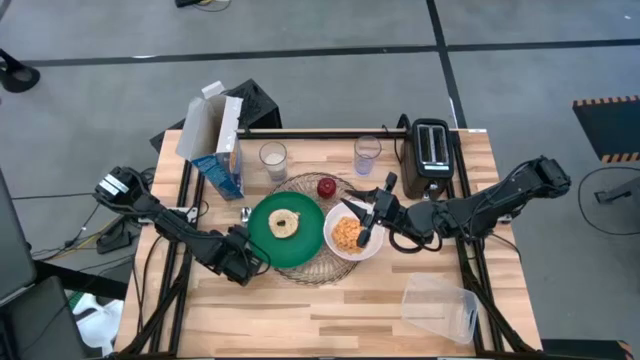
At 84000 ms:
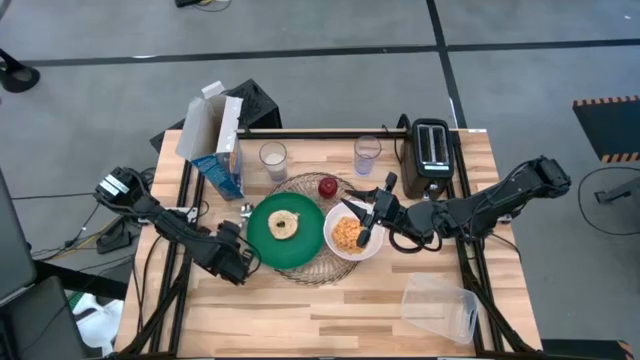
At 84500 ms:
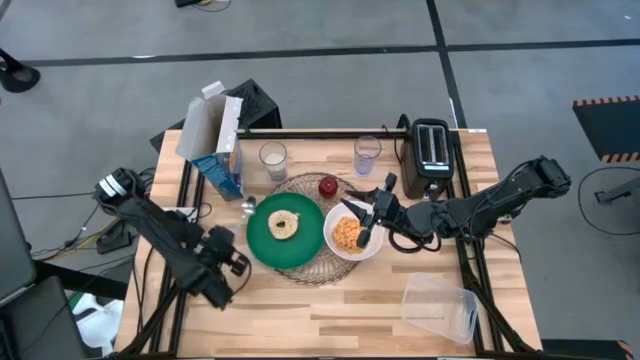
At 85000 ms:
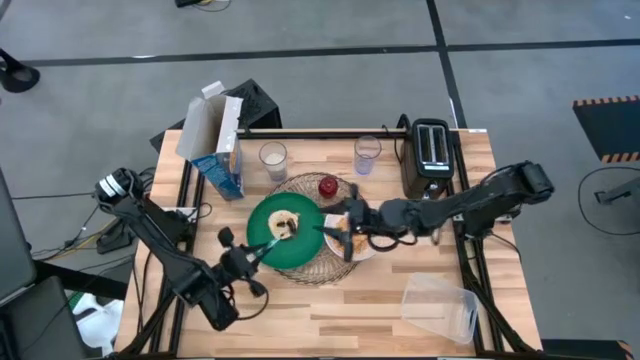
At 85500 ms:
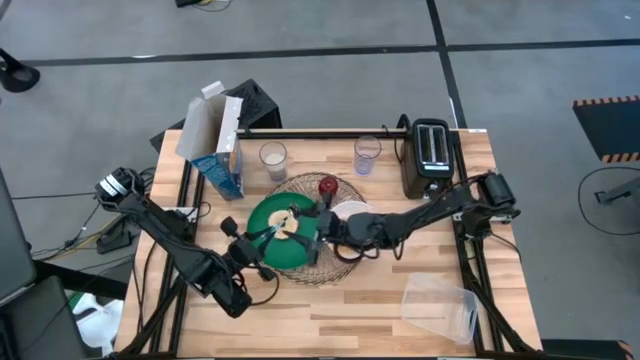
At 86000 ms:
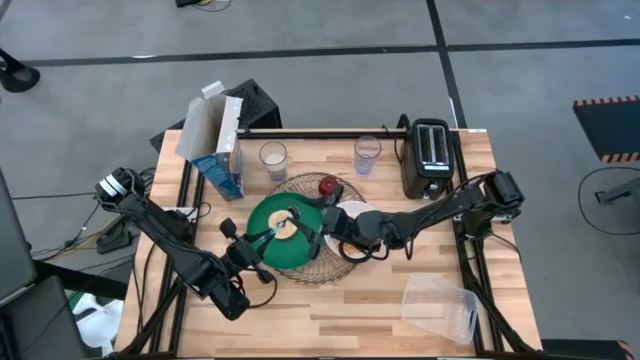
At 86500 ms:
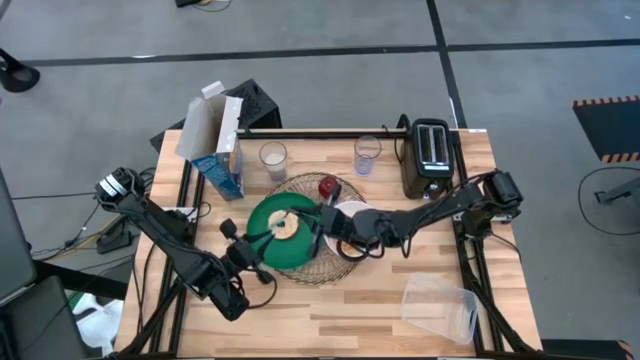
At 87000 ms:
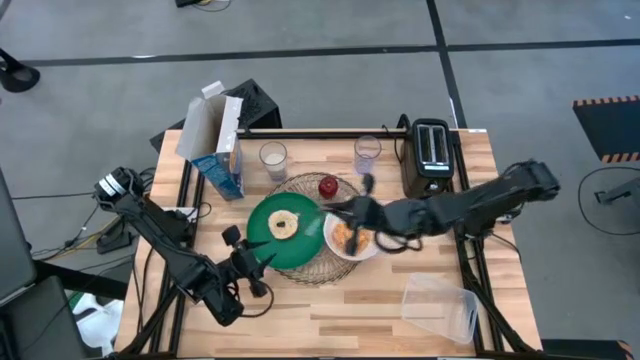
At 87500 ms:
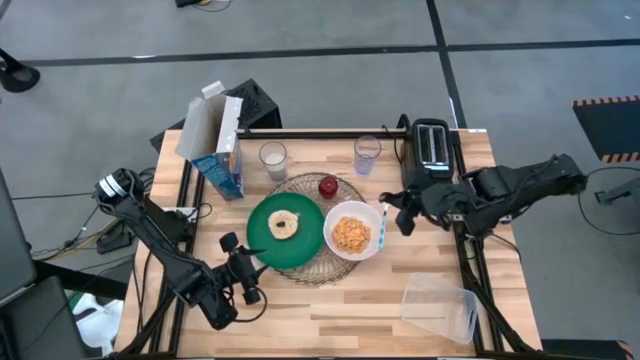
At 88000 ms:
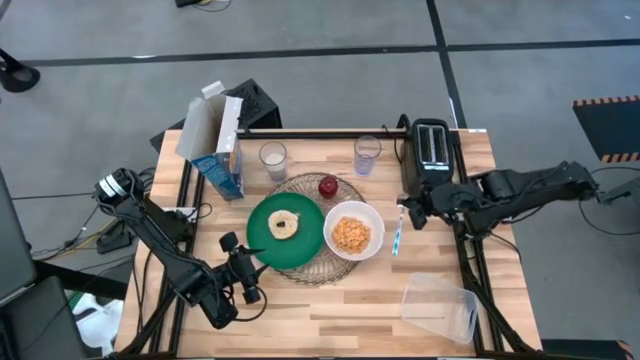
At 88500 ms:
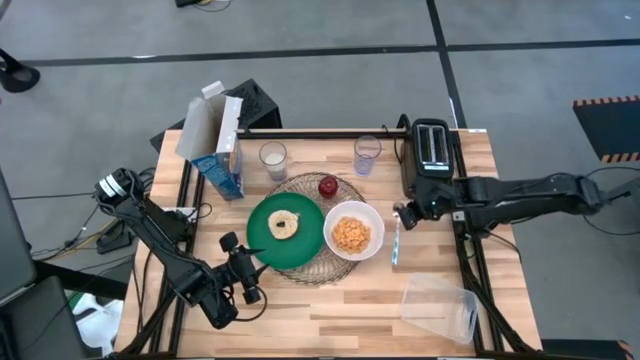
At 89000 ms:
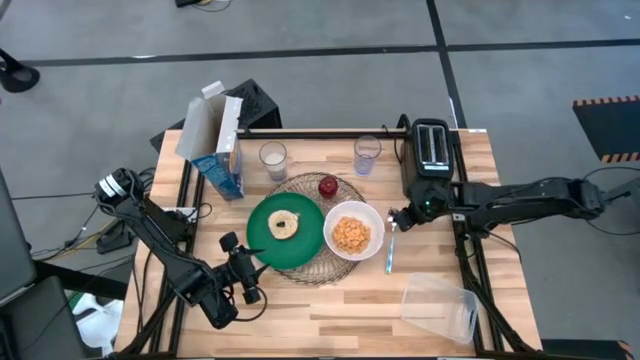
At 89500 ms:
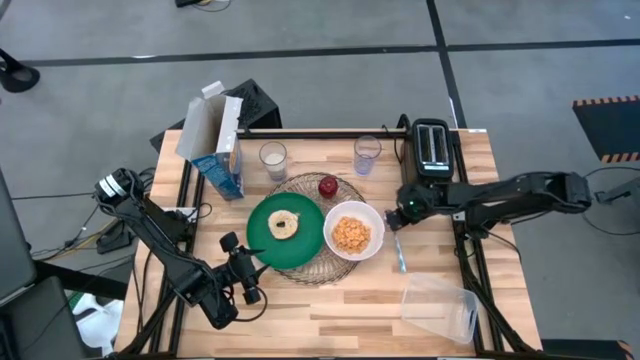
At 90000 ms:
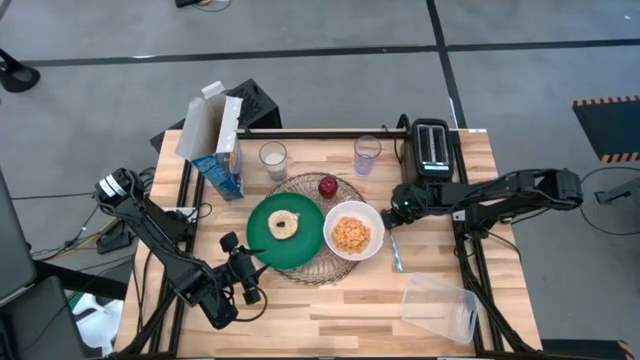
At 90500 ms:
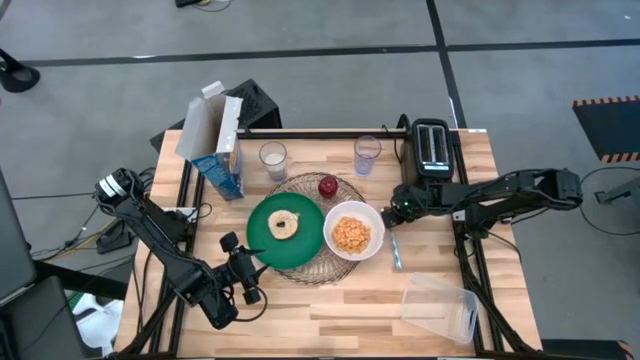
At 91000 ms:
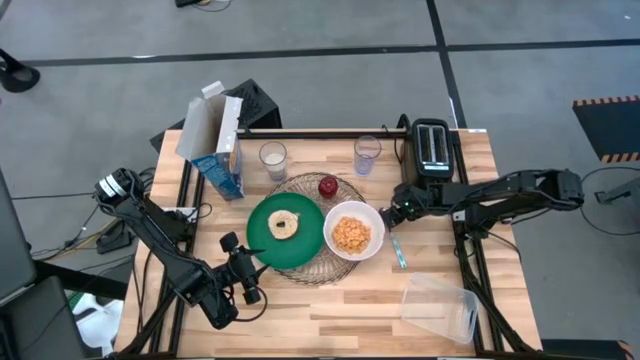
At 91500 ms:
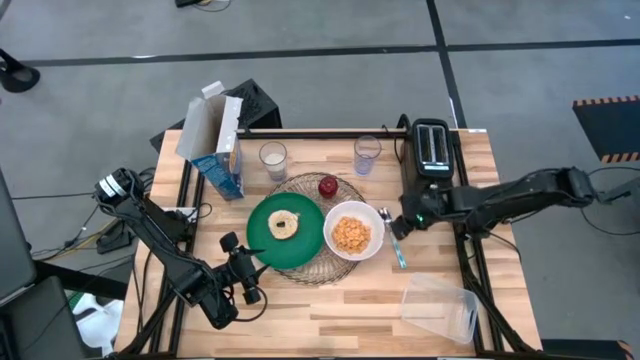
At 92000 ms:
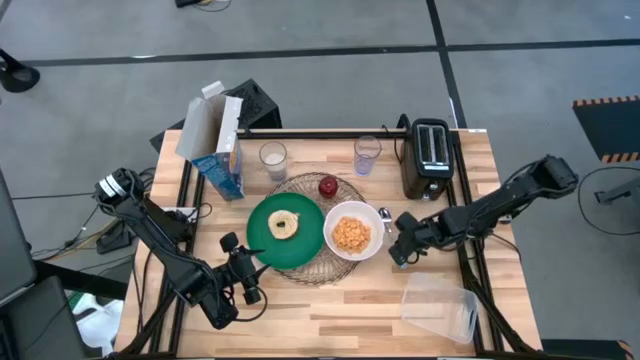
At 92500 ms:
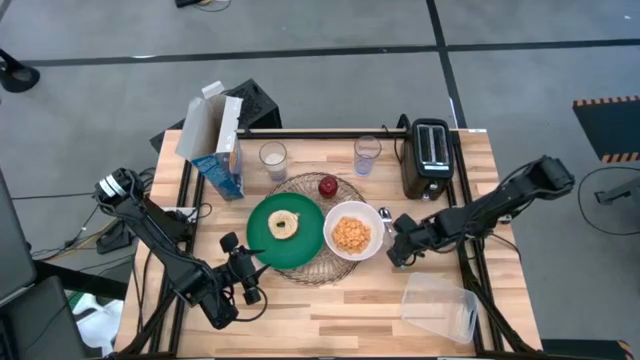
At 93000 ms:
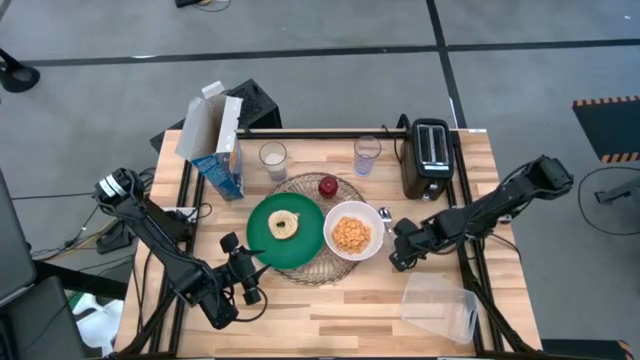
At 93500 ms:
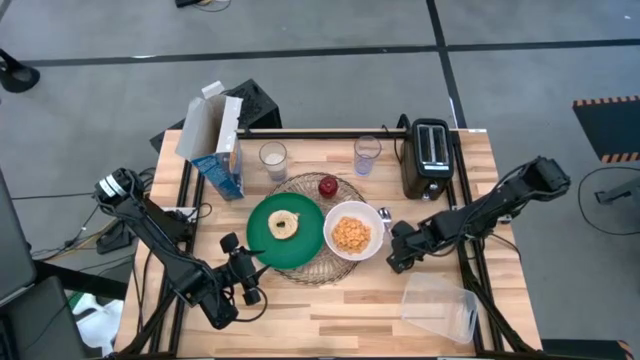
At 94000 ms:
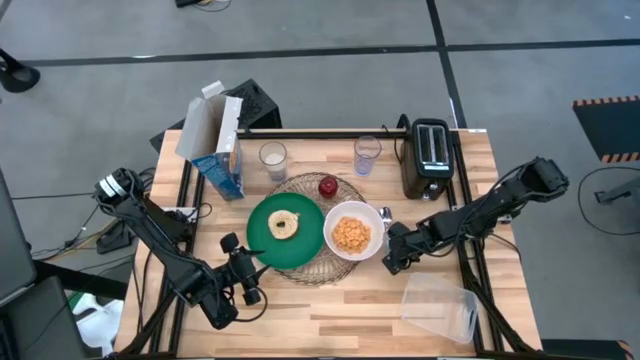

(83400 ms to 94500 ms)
Task: Arrange a breakfast setting
Put the blue patterned spoon to the right of the white bowl

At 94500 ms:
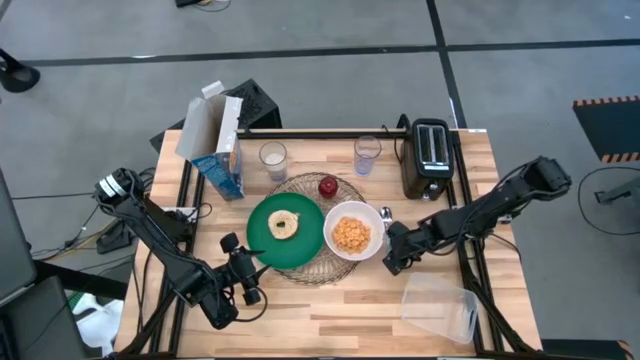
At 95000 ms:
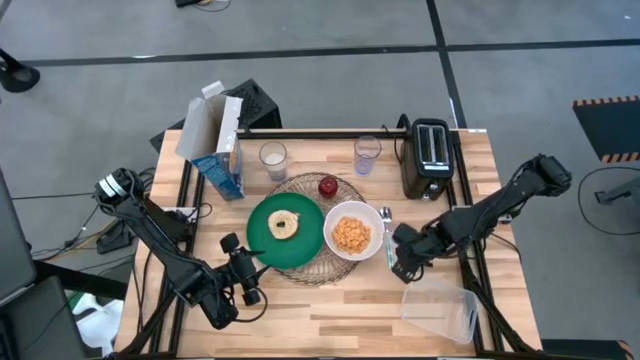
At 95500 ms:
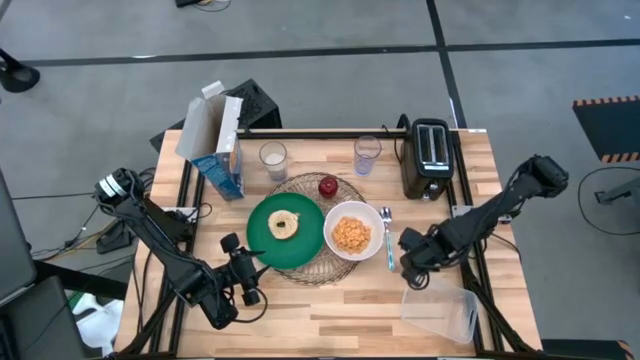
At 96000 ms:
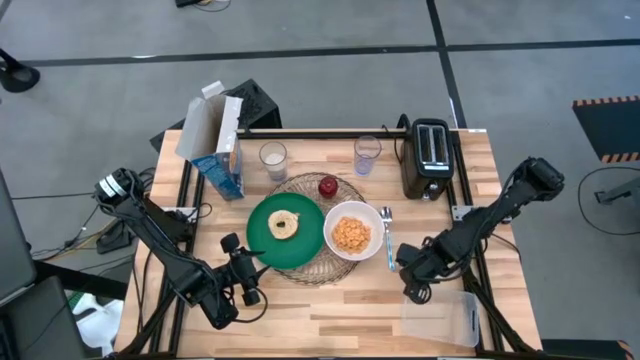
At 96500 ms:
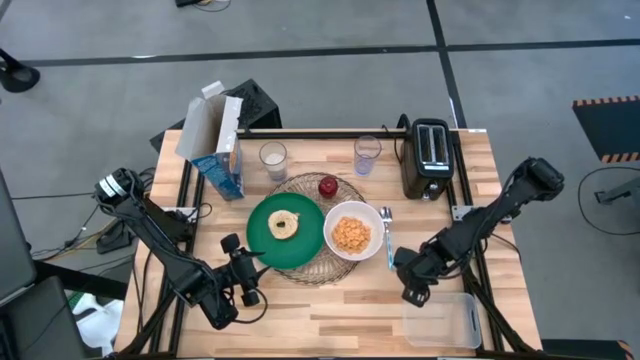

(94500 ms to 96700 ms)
Adjust the transparent bin on the table

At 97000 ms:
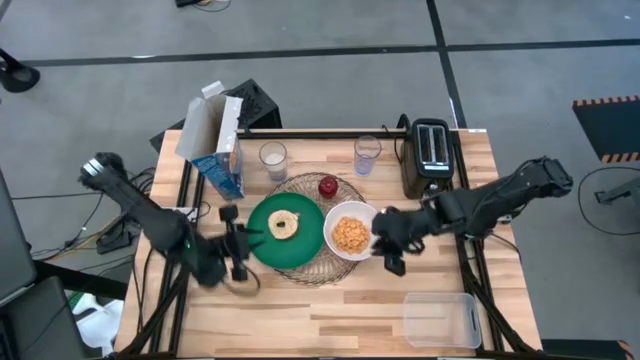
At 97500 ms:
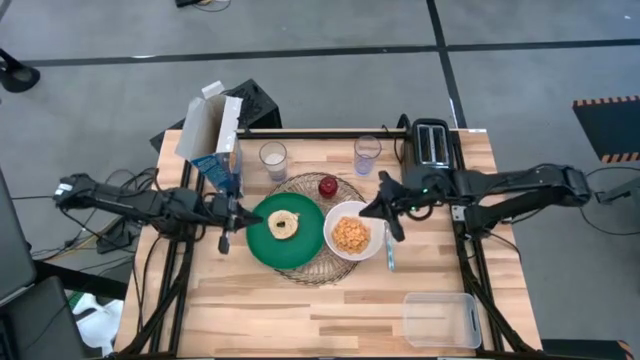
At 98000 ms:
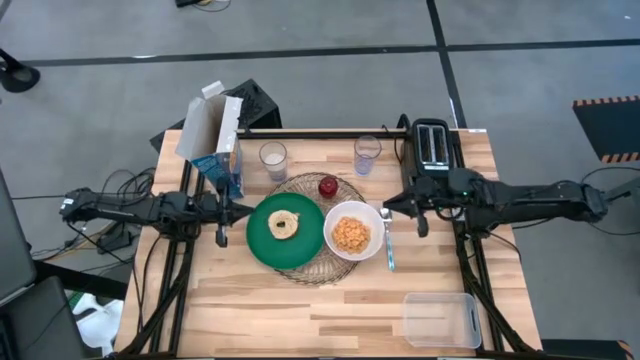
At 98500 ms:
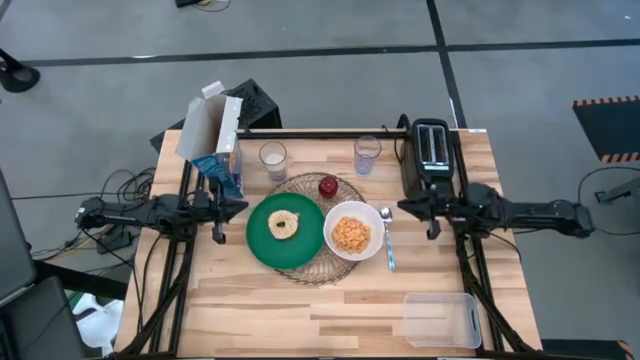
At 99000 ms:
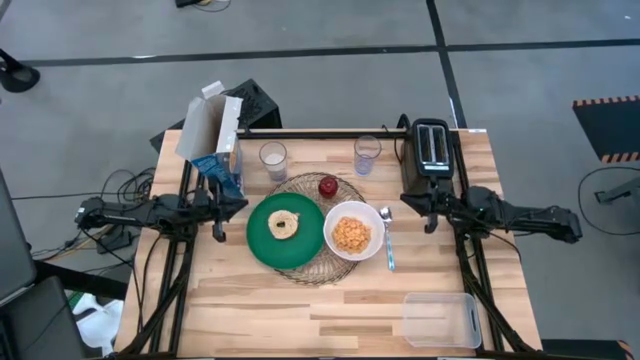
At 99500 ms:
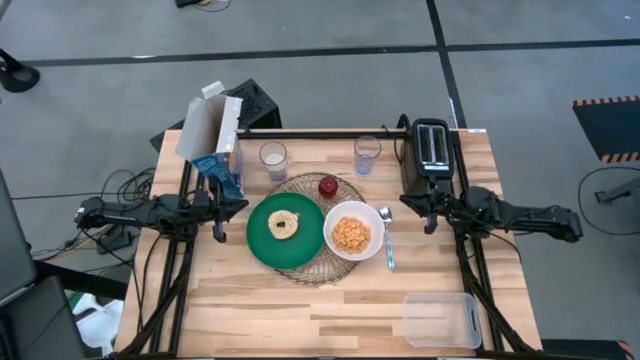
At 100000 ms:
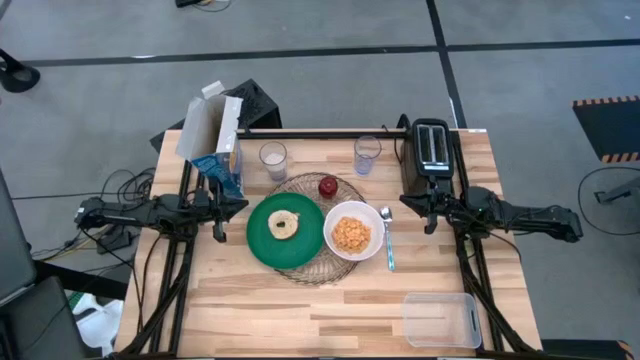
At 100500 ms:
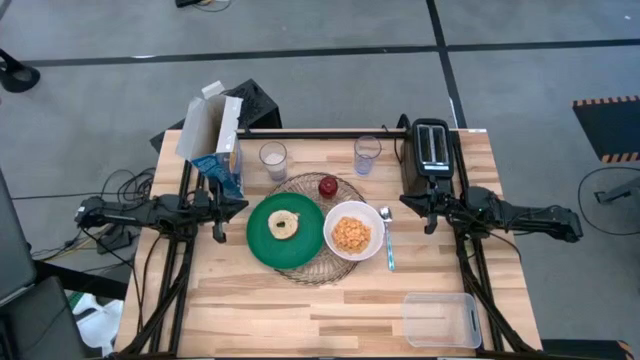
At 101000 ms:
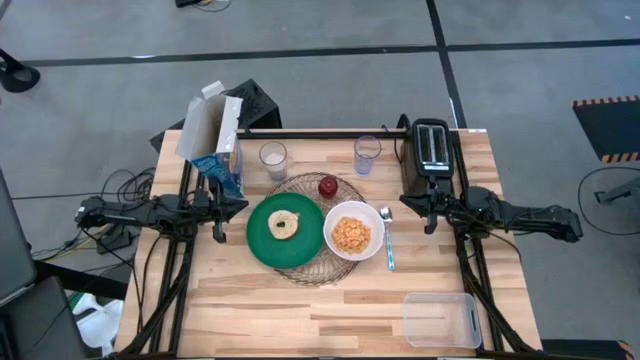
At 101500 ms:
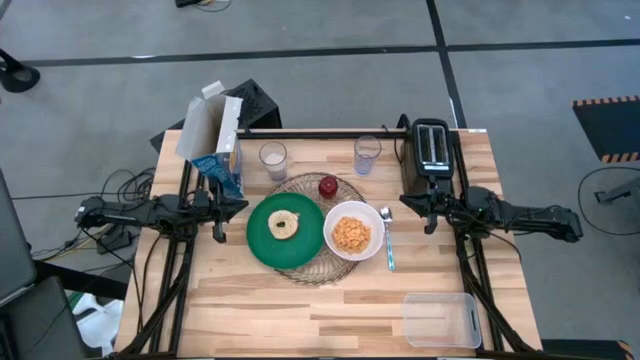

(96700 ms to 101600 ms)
Return to Home Position

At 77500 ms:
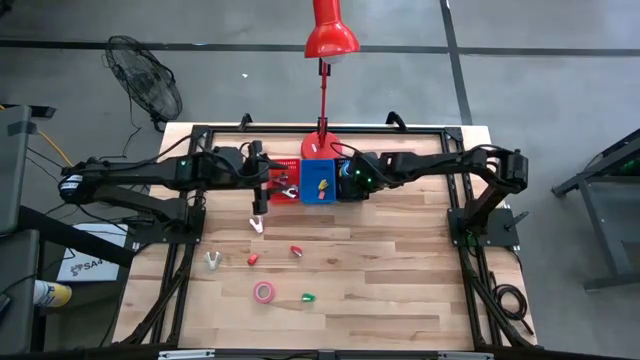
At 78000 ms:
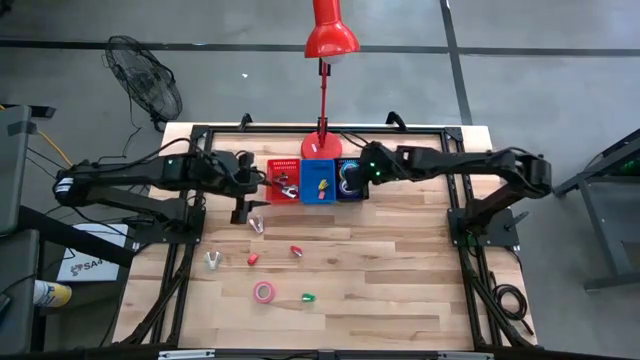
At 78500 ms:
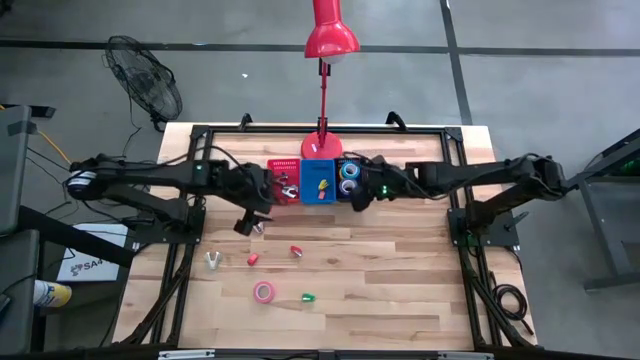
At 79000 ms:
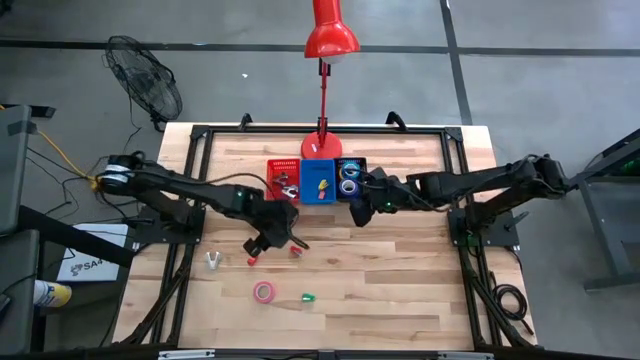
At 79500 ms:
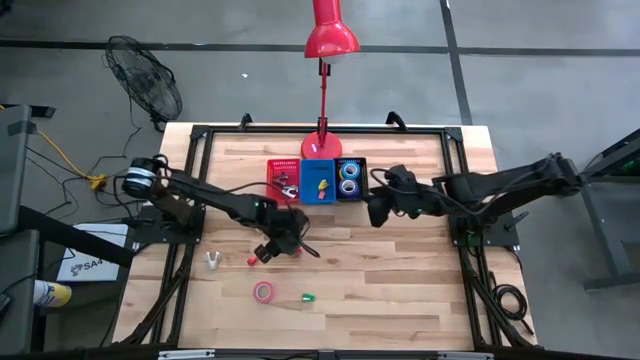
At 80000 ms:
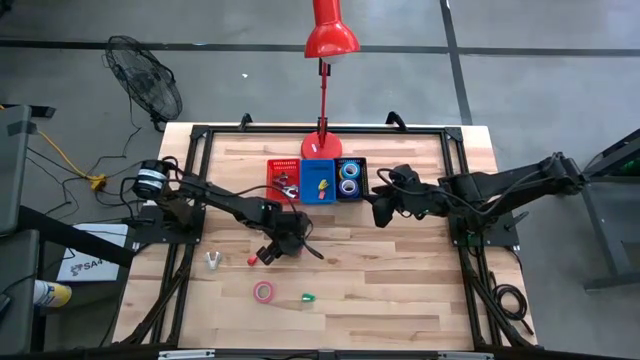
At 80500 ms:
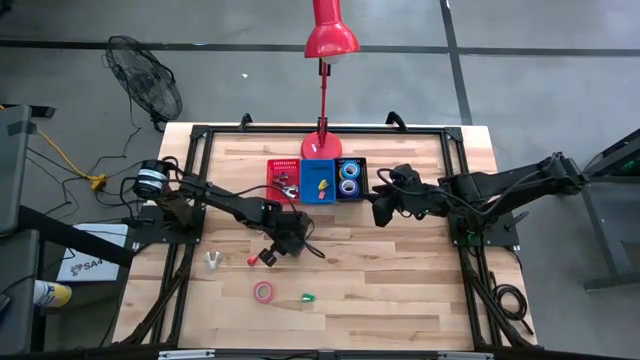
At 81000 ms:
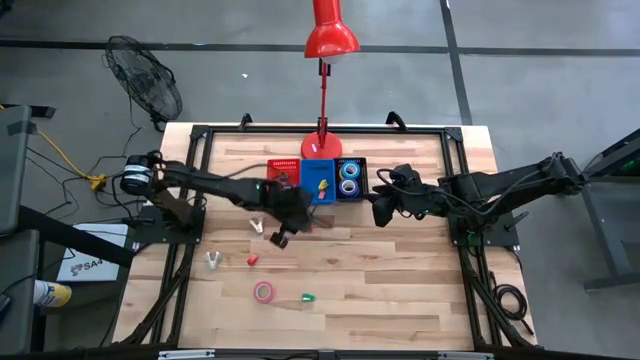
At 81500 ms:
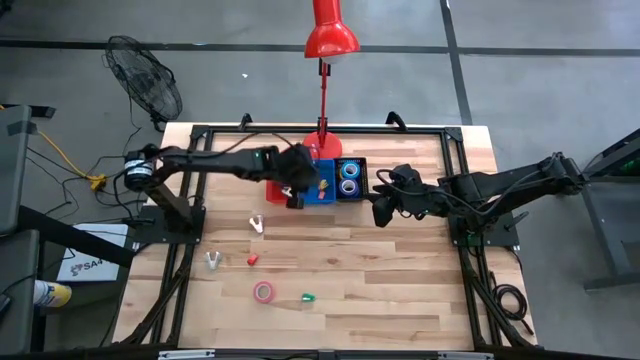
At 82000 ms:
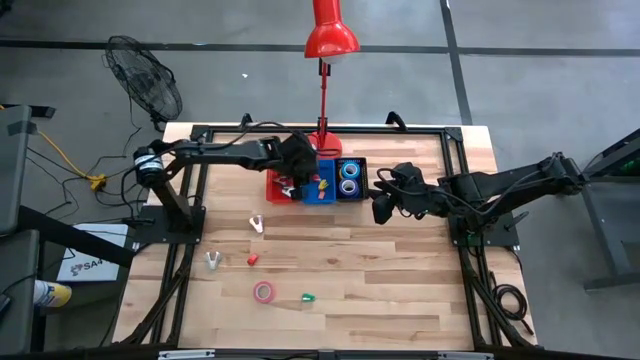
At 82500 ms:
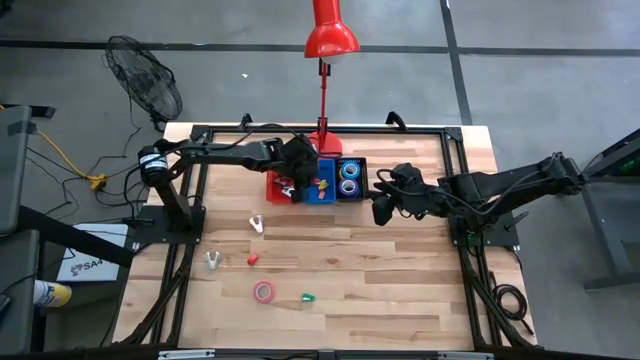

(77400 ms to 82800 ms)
Task: Pick and place Stapler, Stapler remover, tape
Put the right red stapler into the blue basket
